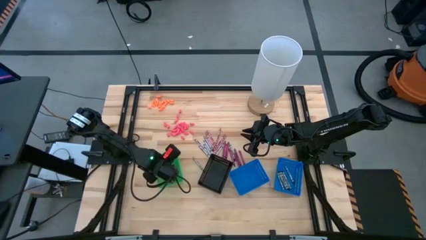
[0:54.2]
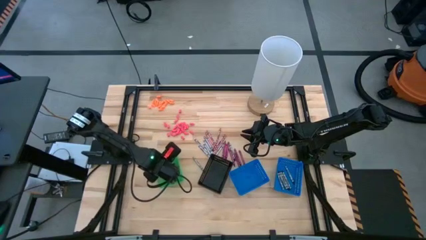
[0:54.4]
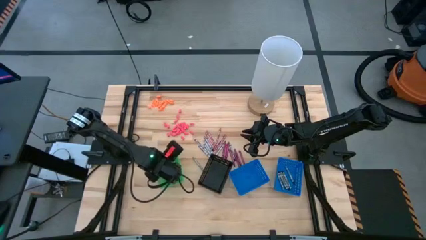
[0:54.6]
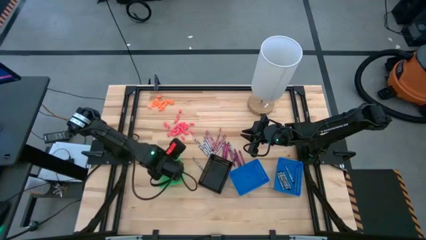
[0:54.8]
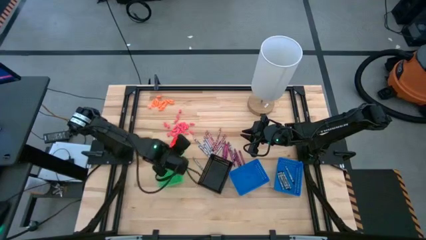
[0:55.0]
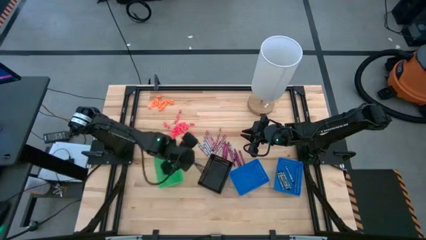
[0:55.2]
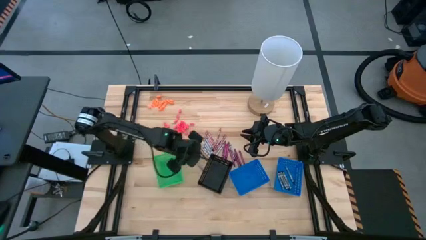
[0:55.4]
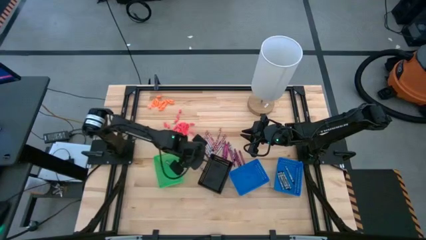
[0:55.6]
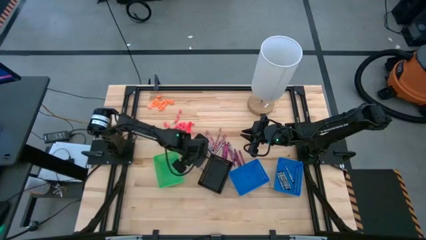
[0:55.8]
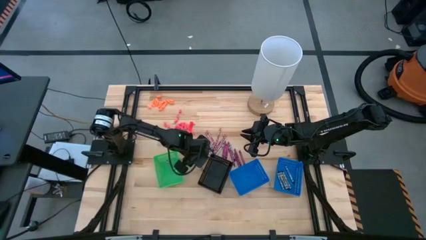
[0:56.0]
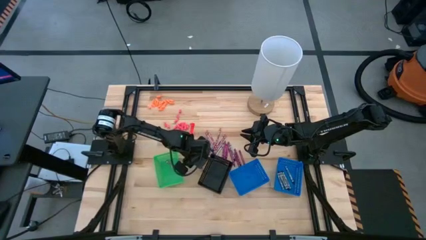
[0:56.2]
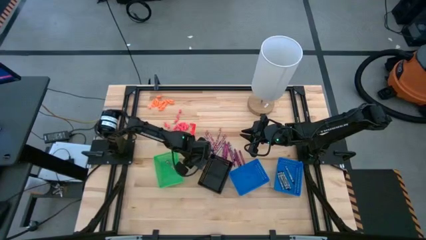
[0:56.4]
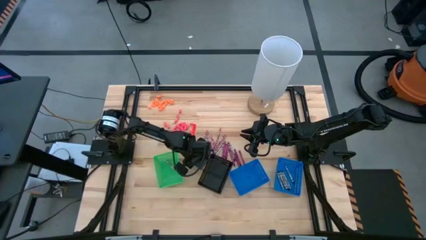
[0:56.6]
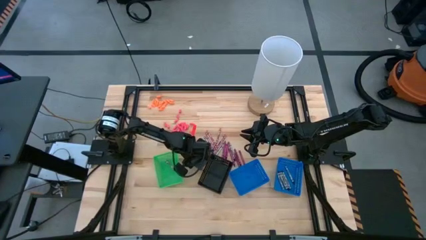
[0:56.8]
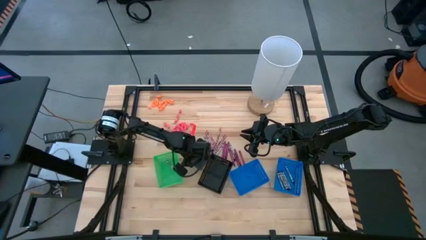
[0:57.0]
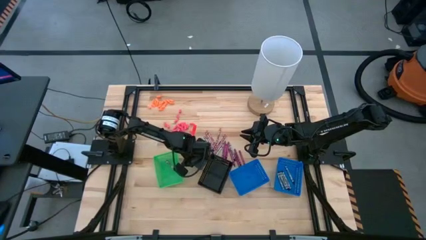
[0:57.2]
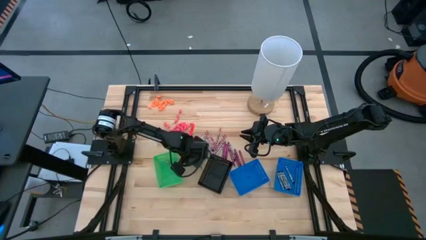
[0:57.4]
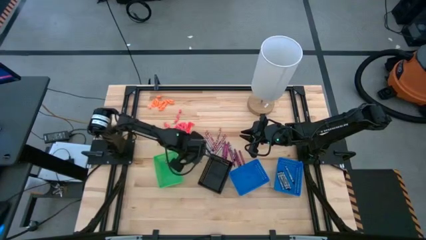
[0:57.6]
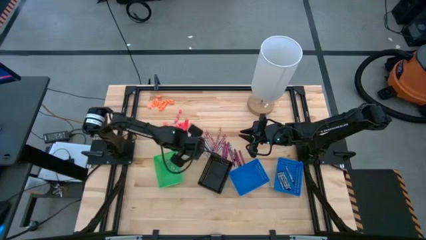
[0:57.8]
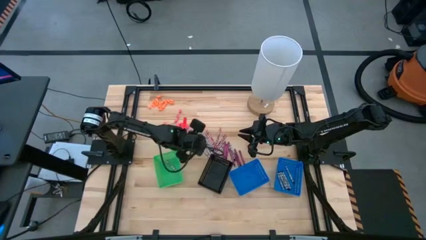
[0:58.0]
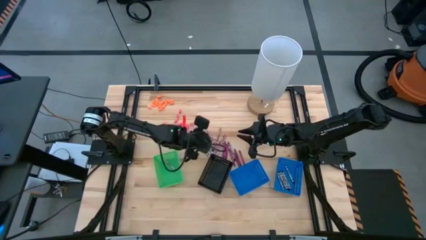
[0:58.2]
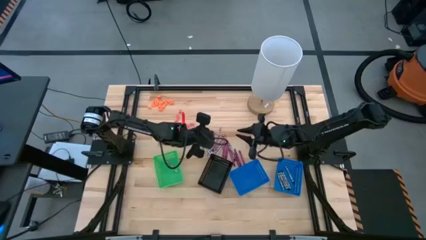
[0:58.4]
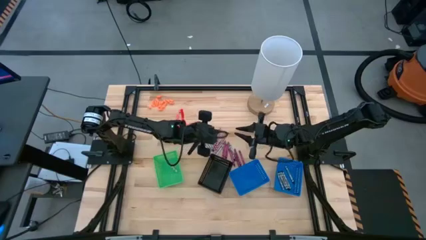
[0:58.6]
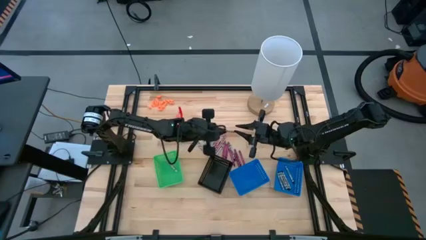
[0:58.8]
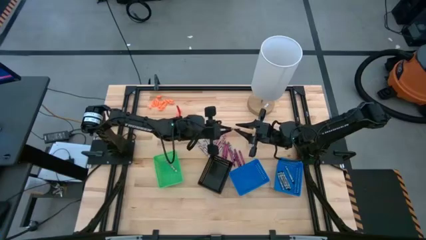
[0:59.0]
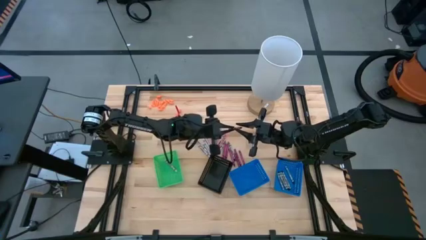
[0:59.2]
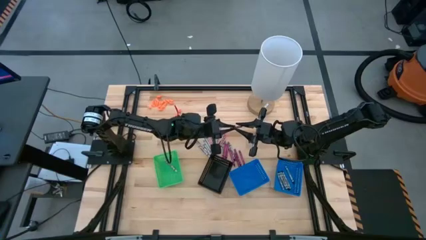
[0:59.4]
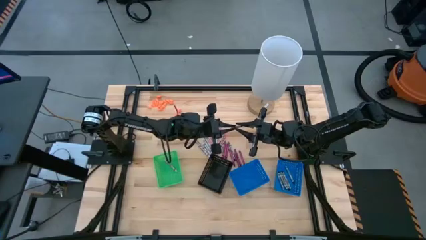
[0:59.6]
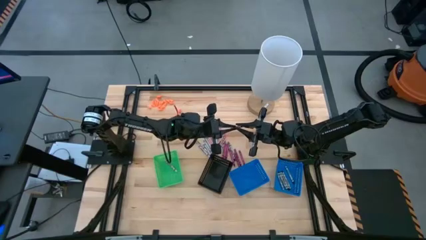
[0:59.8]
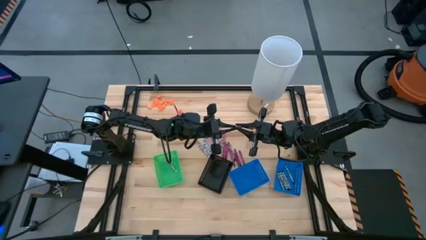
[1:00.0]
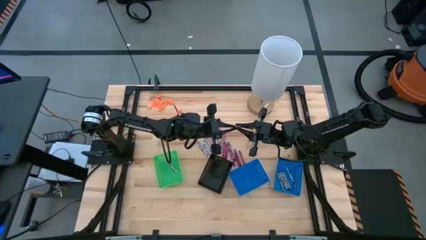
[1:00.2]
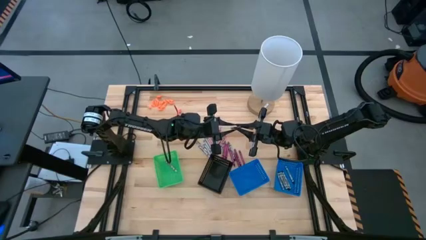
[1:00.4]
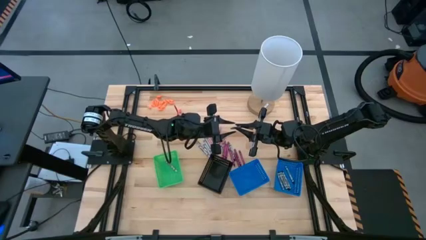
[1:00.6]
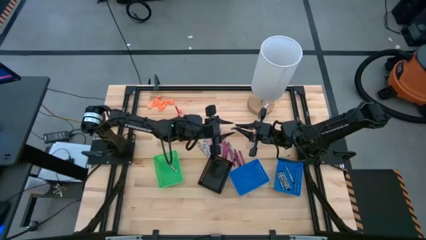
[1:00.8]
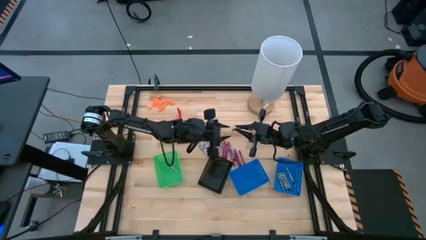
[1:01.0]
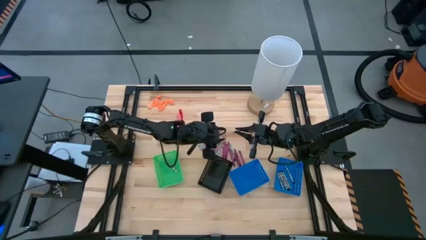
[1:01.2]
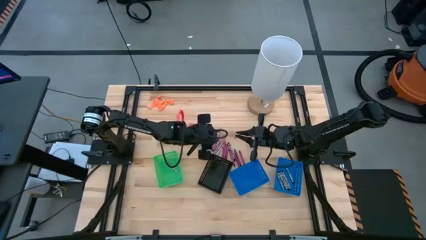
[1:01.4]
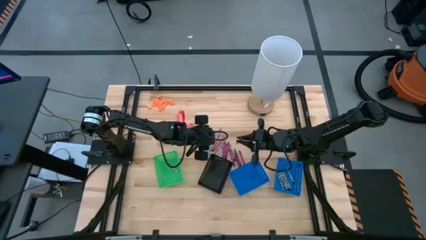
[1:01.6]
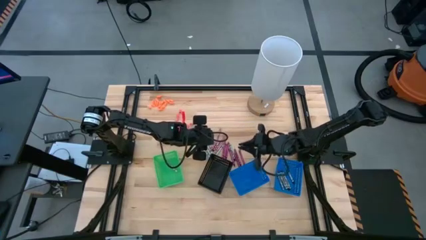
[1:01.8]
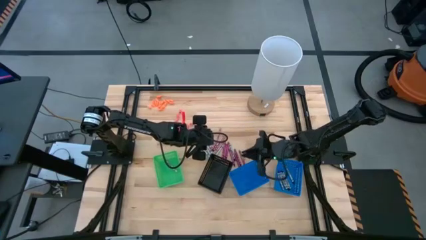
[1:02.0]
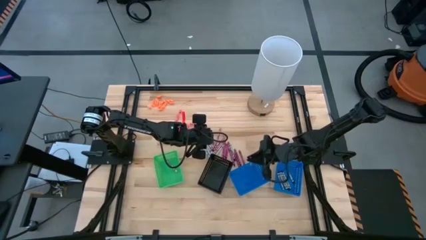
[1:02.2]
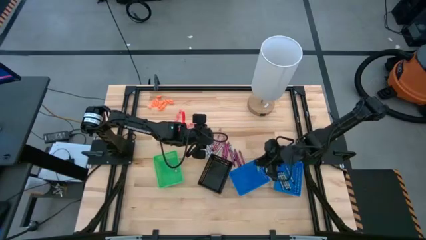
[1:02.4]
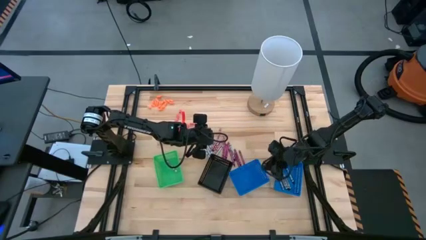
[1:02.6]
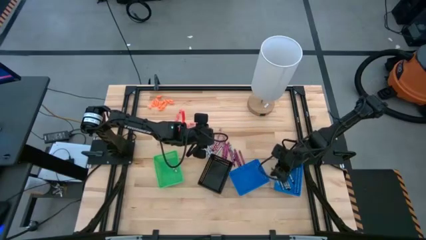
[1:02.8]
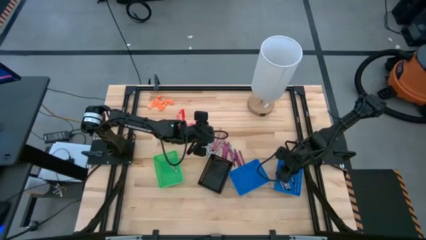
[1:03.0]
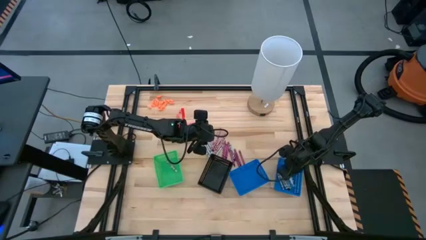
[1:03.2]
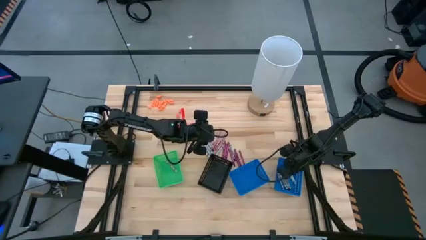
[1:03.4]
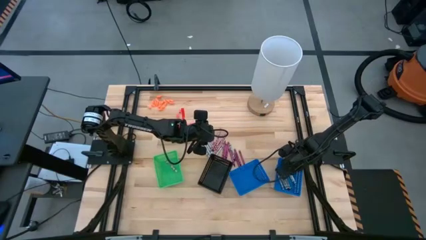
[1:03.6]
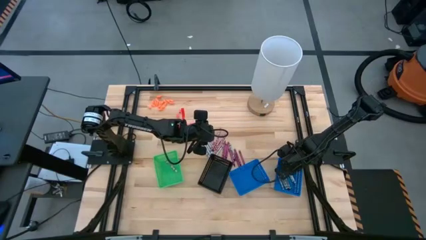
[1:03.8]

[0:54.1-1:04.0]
Task: Sort crayons
Put the black crayon into the right blue bin

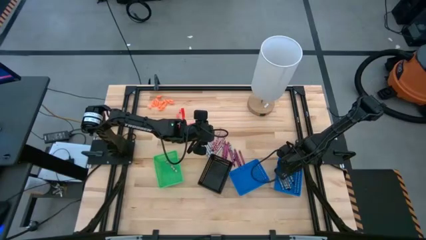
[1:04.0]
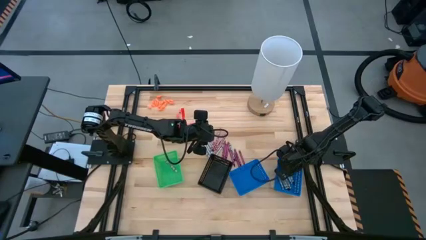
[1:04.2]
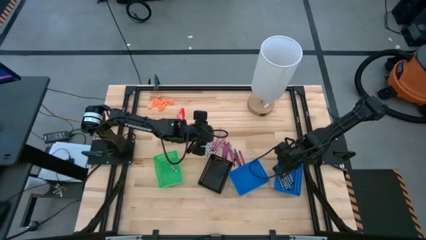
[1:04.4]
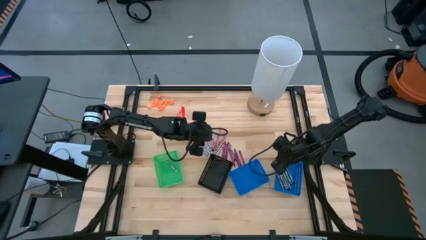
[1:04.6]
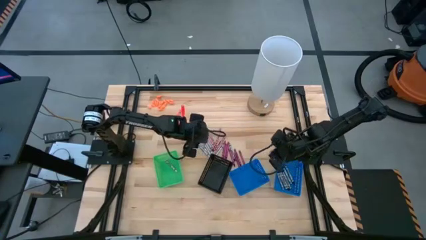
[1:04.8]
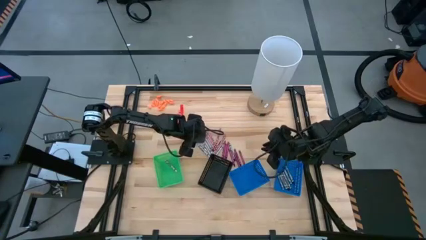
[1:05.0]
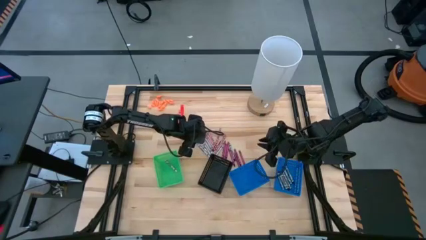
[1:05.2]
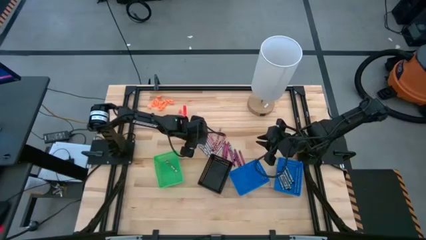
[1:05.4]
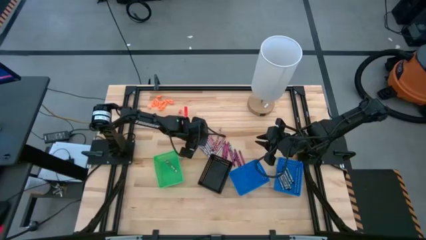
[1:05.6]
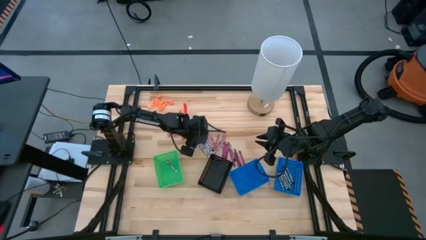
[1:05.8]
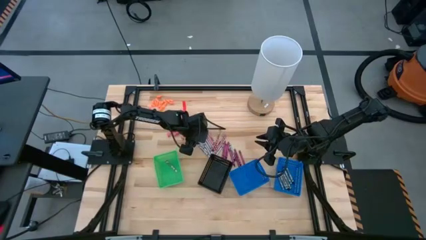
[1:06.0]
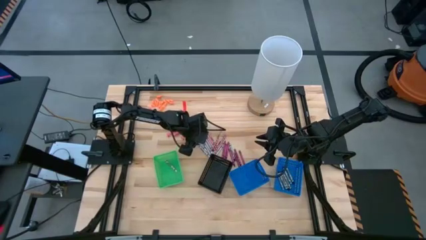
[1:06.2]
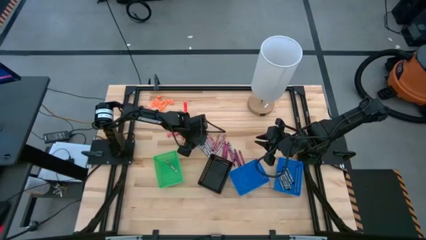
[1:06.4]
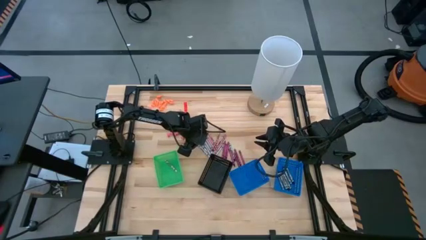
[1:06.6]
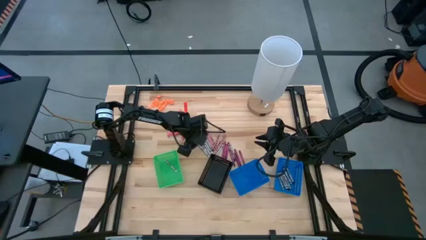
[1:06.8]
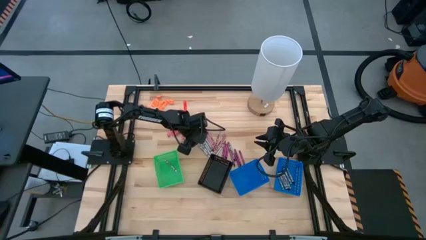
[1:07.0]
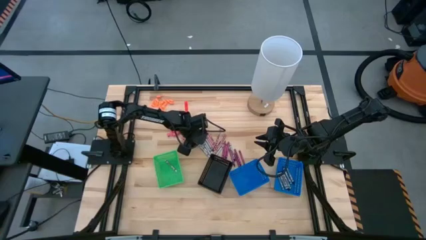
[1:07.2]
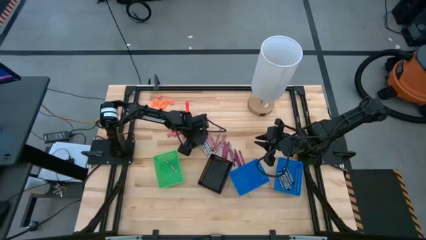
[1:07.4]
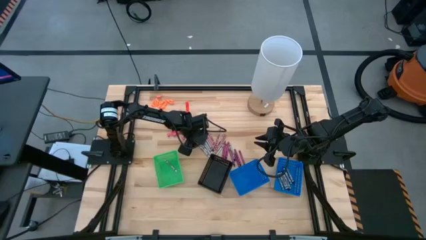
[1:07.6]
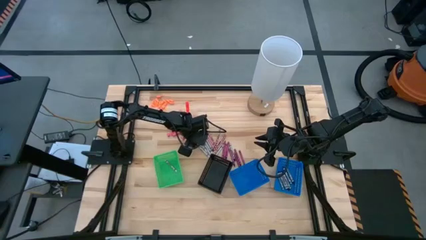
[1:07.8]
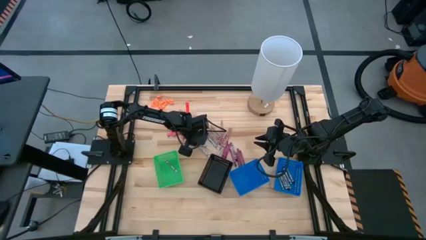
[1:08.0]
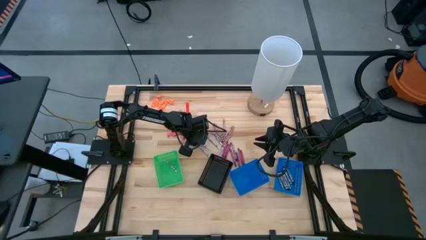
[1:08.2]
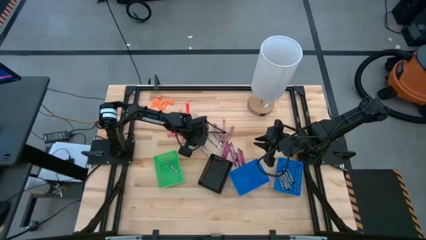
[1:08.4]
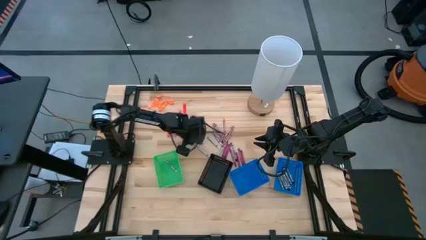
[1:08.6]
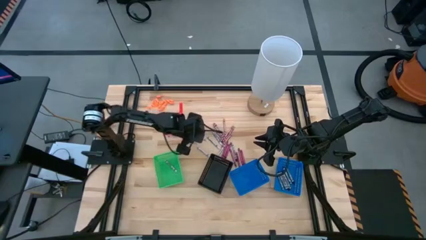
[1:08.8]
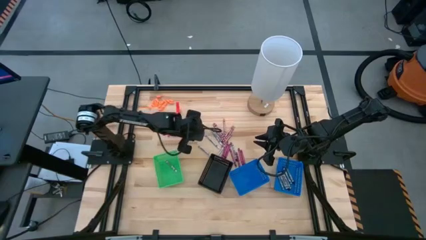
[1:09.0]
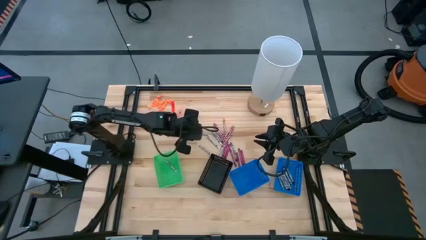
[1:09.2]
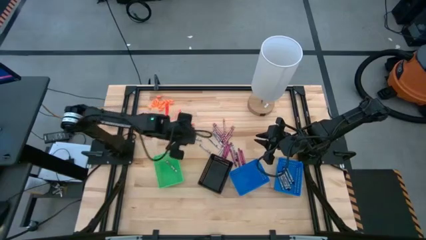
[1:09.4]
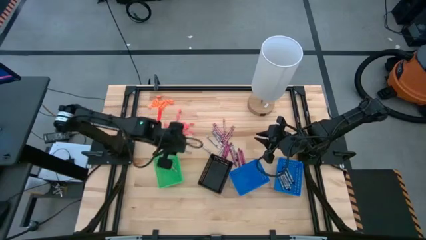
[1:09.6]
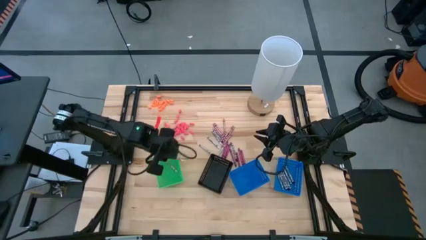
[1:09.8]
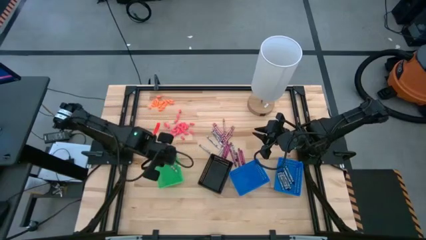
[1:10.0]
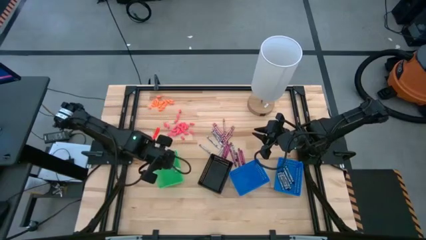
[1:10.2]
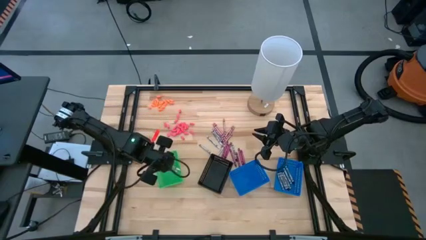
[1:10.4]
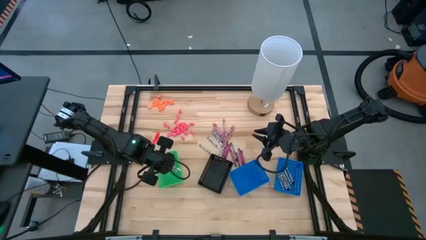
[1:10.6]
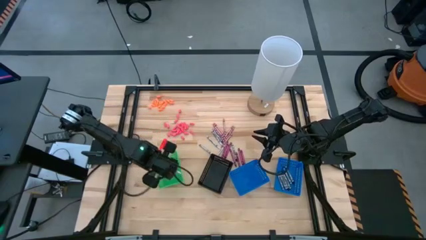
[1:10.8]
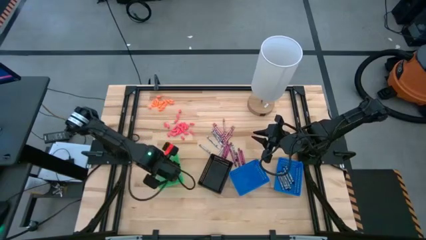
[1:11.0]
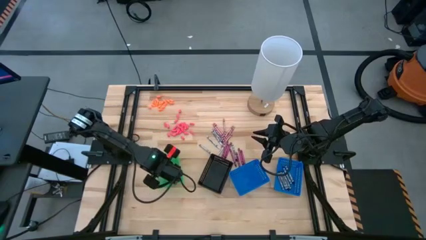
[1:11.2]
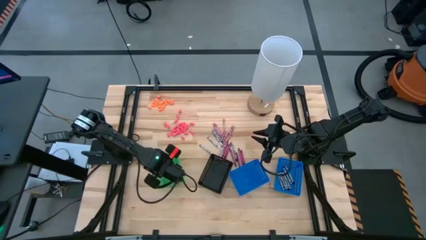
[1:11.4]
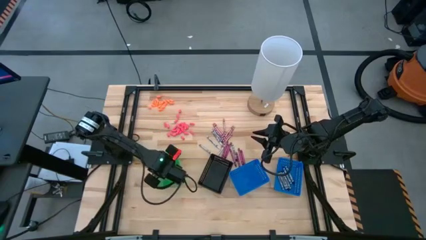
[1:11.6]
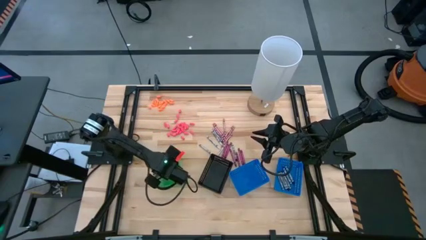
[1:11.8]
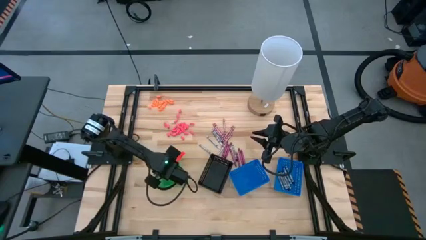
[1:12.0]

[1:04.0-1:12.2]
Put the white crayon into the green bin
